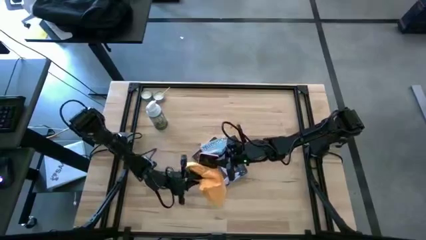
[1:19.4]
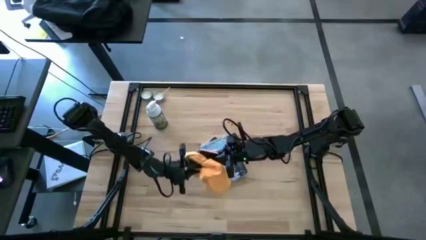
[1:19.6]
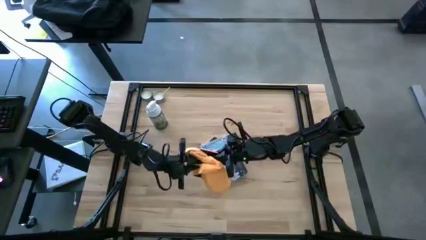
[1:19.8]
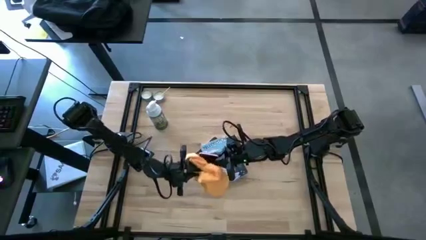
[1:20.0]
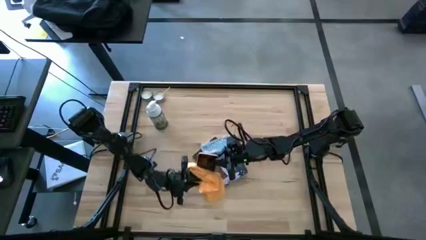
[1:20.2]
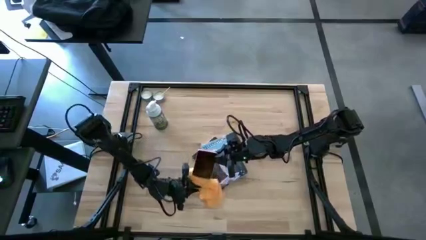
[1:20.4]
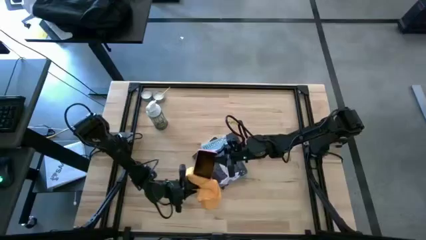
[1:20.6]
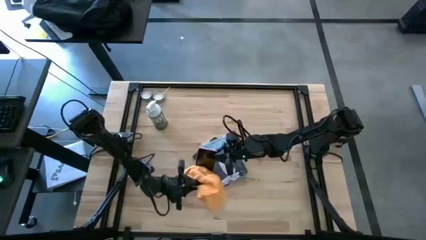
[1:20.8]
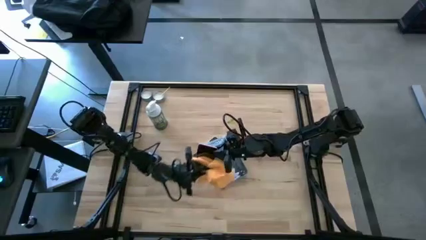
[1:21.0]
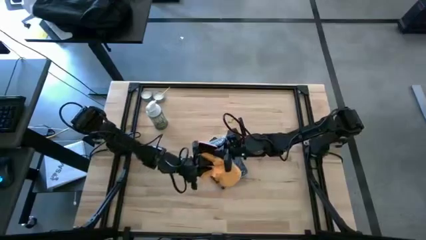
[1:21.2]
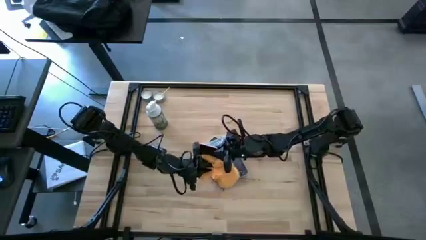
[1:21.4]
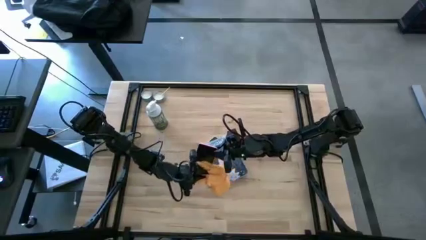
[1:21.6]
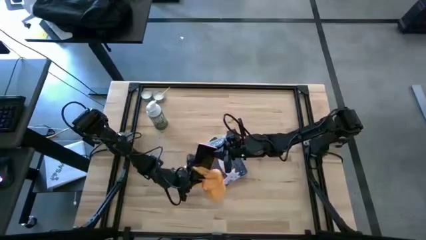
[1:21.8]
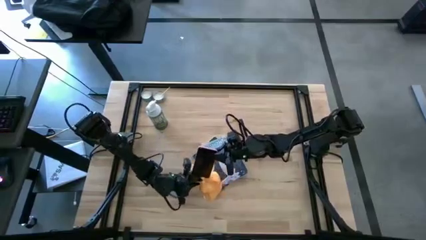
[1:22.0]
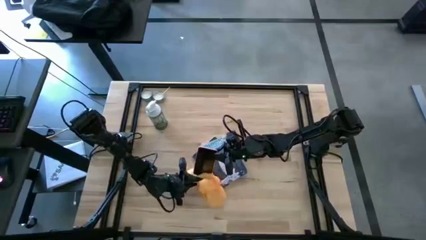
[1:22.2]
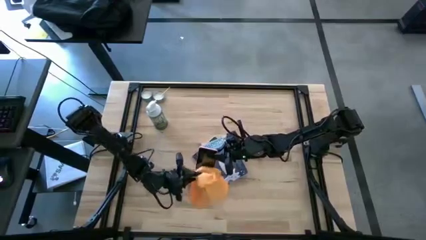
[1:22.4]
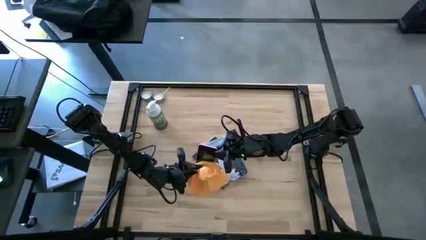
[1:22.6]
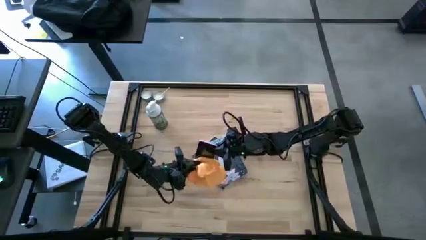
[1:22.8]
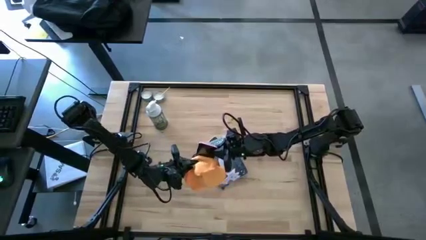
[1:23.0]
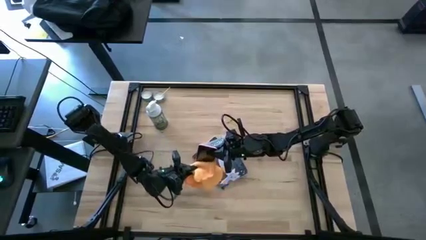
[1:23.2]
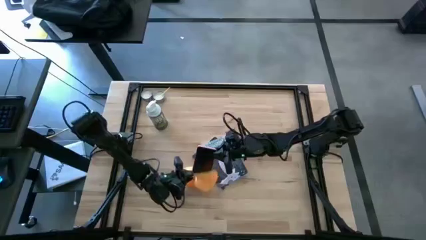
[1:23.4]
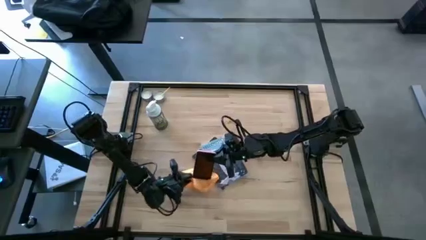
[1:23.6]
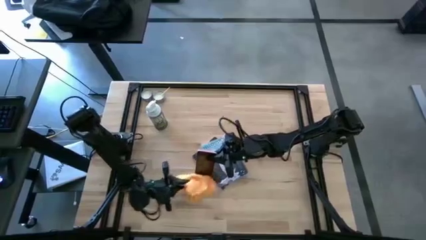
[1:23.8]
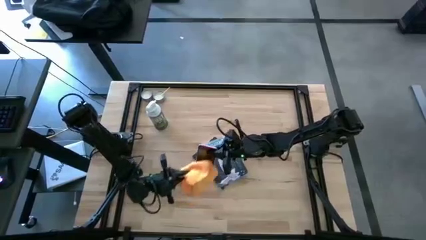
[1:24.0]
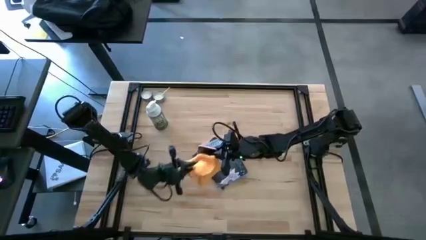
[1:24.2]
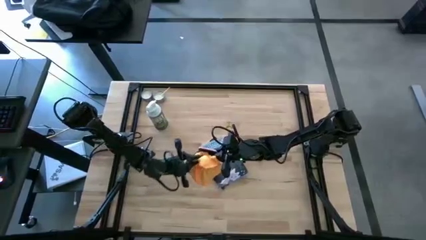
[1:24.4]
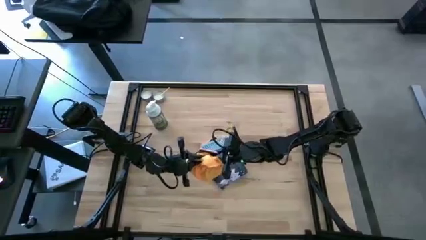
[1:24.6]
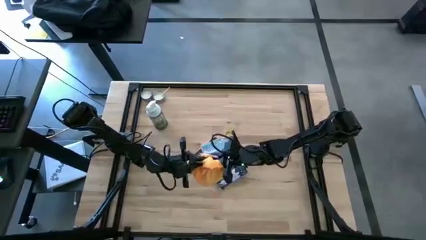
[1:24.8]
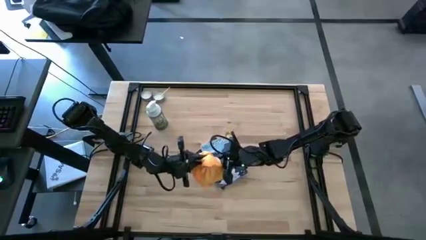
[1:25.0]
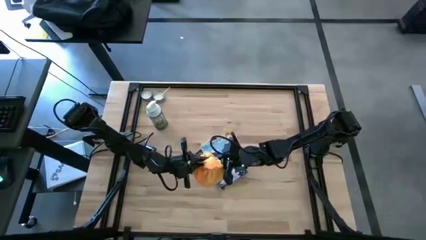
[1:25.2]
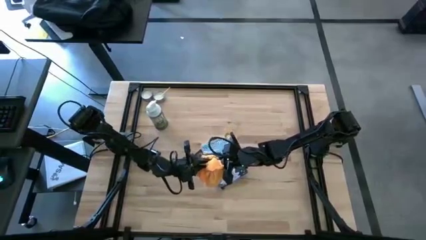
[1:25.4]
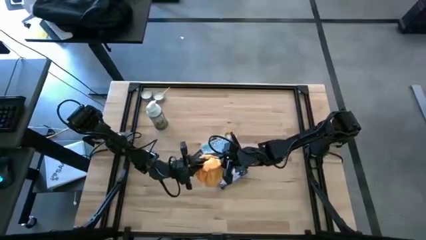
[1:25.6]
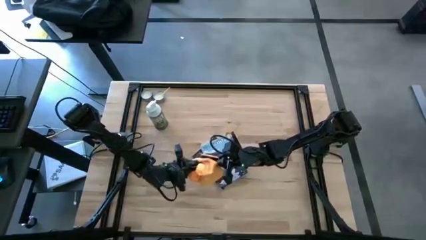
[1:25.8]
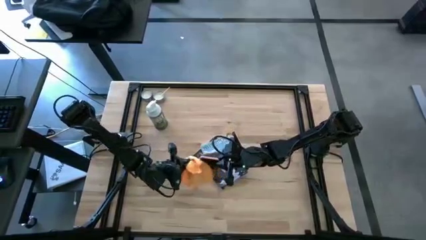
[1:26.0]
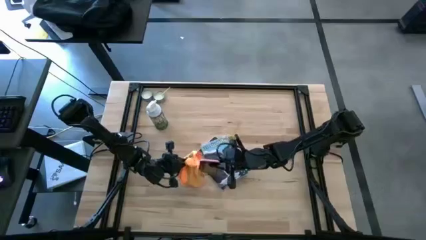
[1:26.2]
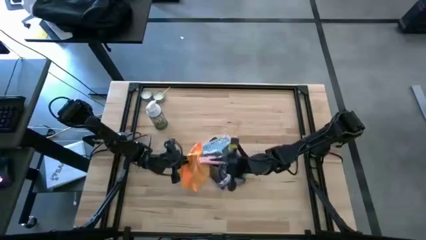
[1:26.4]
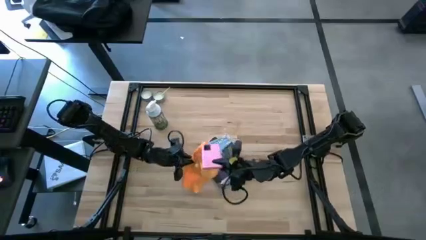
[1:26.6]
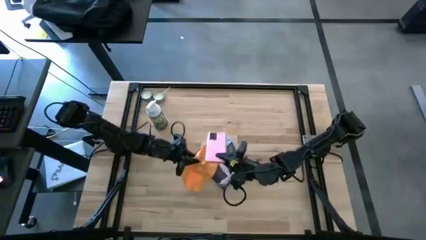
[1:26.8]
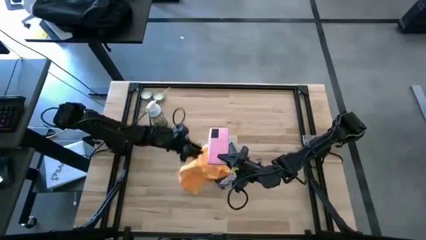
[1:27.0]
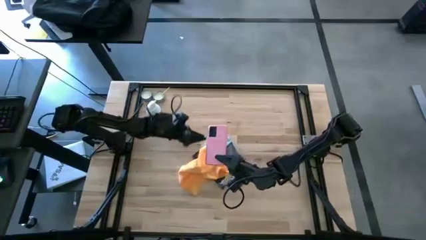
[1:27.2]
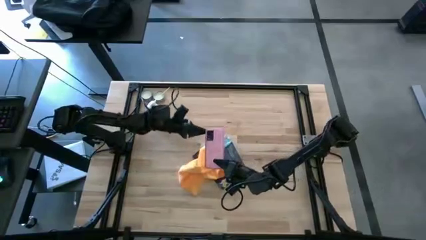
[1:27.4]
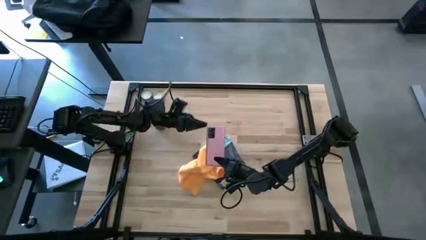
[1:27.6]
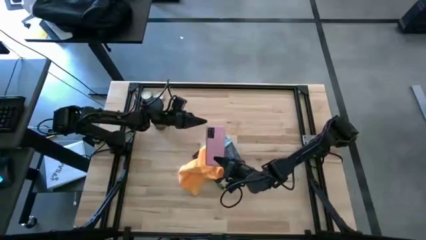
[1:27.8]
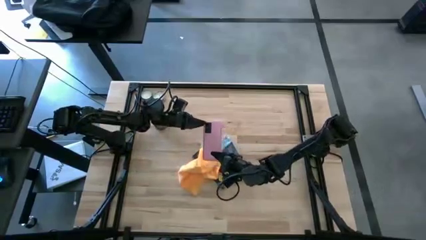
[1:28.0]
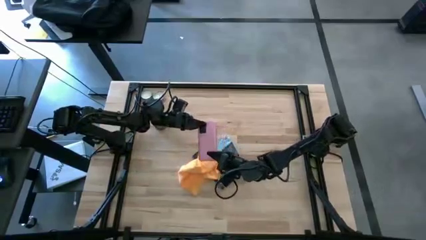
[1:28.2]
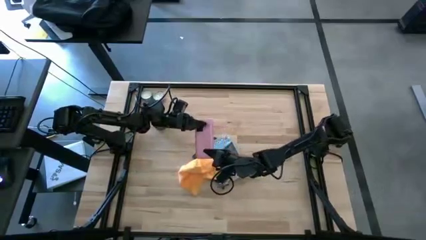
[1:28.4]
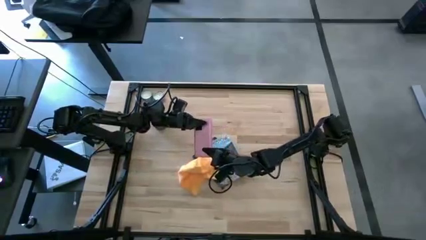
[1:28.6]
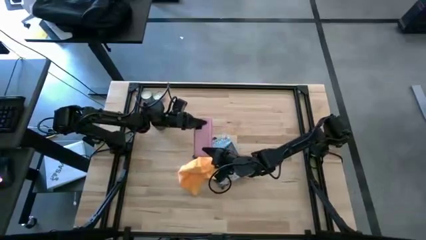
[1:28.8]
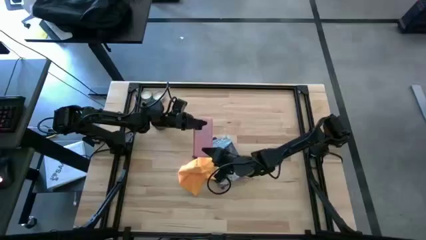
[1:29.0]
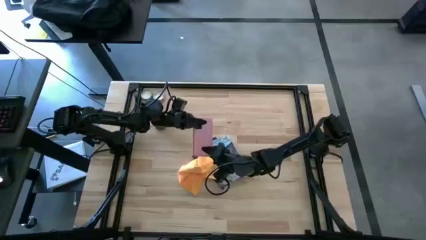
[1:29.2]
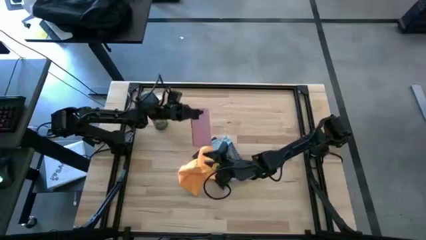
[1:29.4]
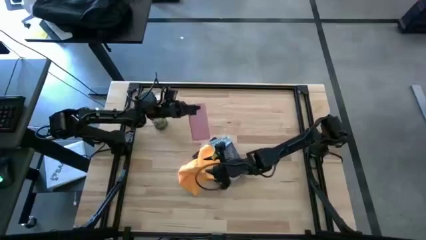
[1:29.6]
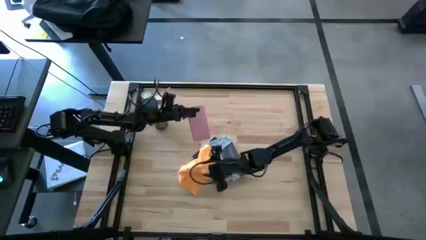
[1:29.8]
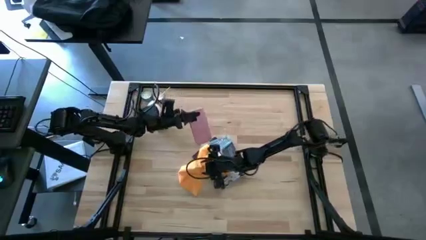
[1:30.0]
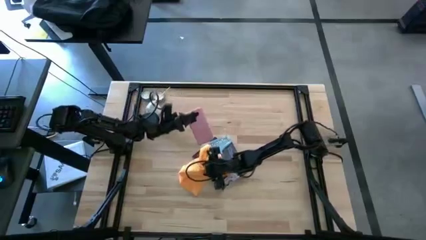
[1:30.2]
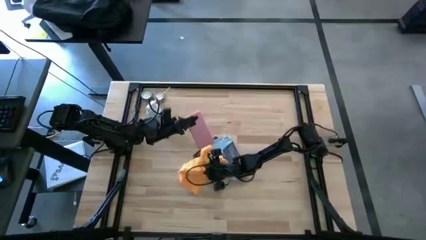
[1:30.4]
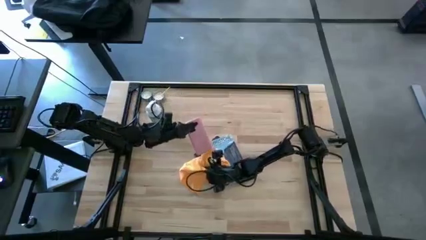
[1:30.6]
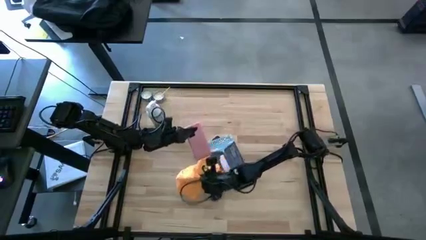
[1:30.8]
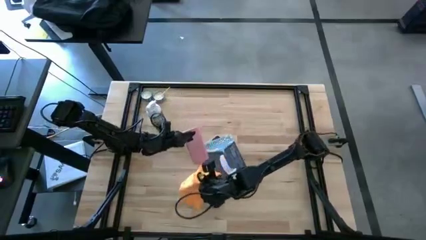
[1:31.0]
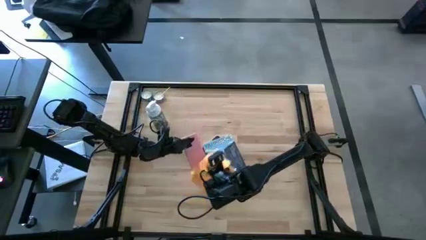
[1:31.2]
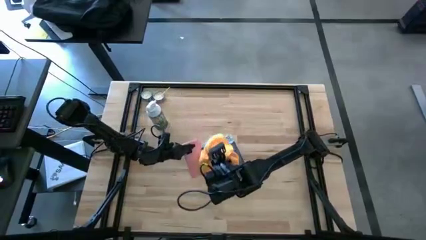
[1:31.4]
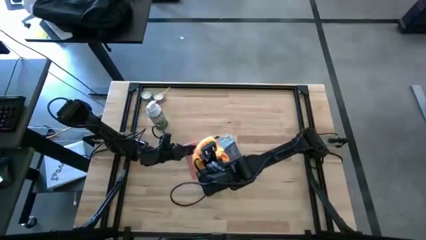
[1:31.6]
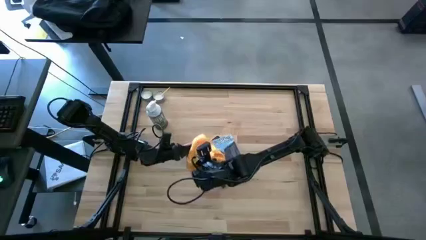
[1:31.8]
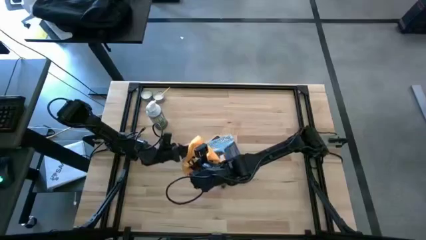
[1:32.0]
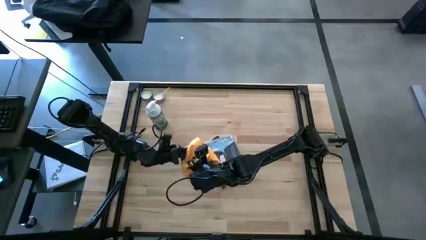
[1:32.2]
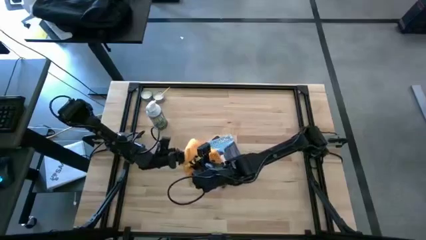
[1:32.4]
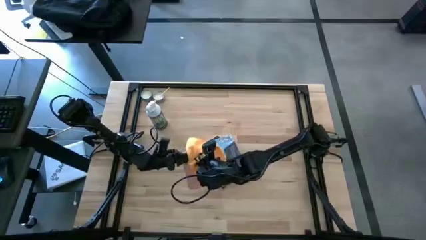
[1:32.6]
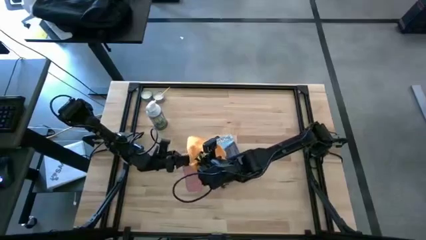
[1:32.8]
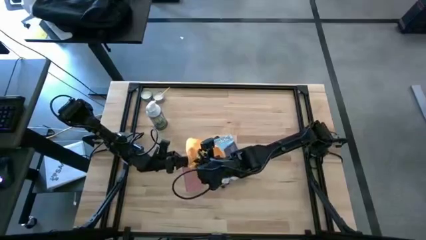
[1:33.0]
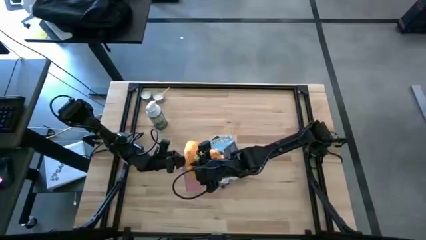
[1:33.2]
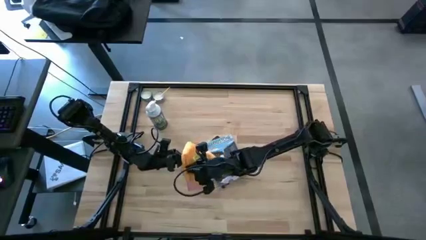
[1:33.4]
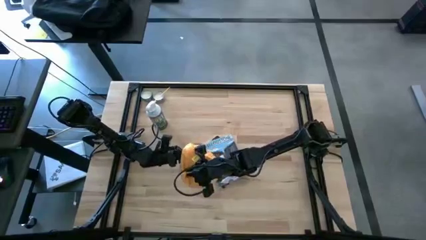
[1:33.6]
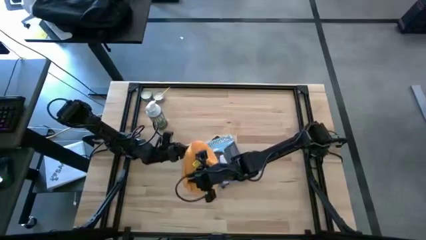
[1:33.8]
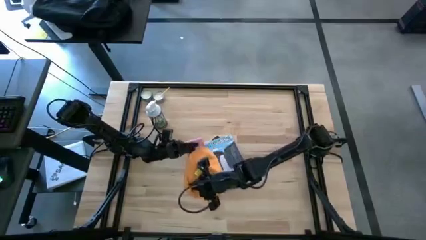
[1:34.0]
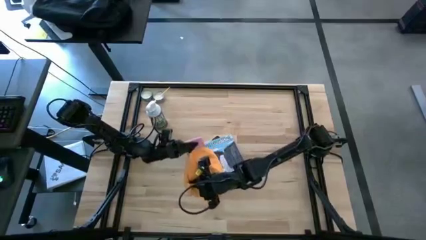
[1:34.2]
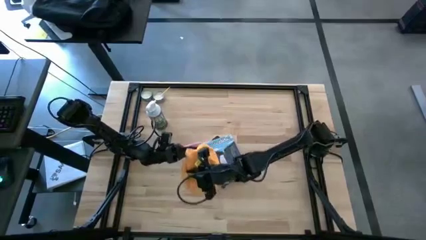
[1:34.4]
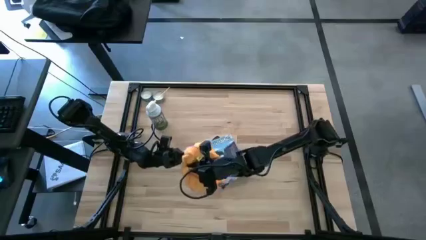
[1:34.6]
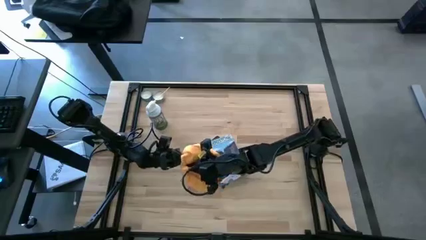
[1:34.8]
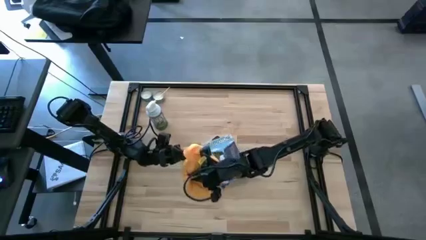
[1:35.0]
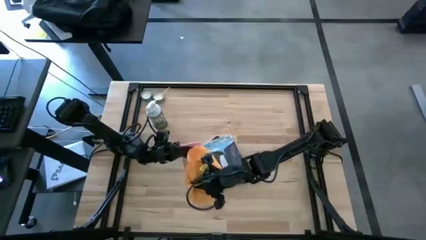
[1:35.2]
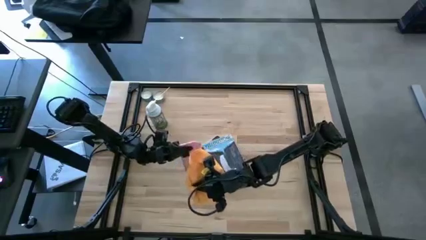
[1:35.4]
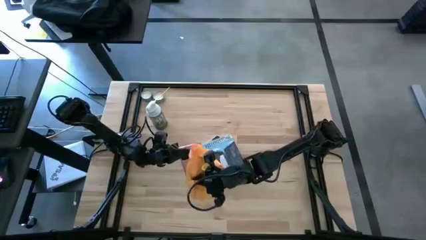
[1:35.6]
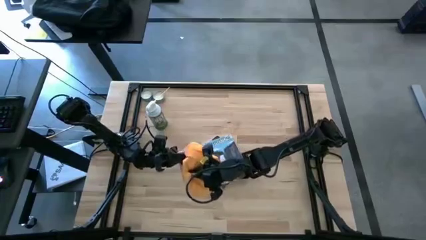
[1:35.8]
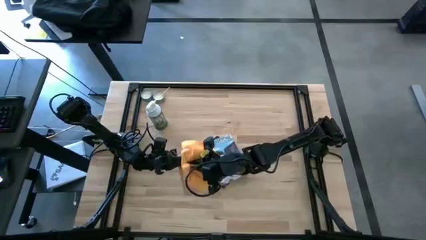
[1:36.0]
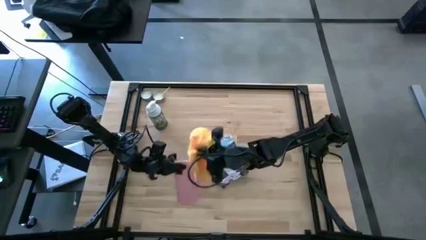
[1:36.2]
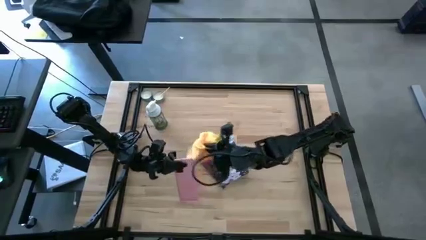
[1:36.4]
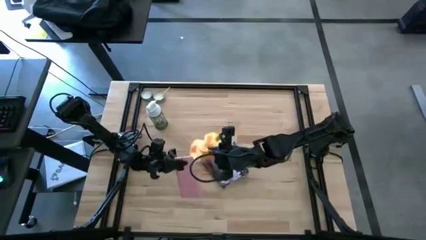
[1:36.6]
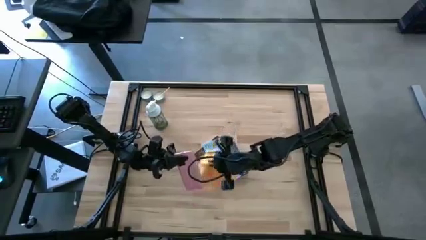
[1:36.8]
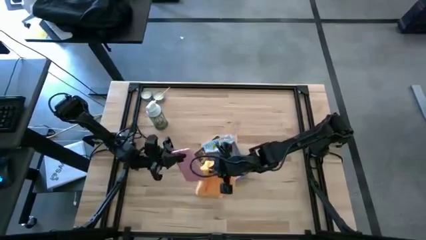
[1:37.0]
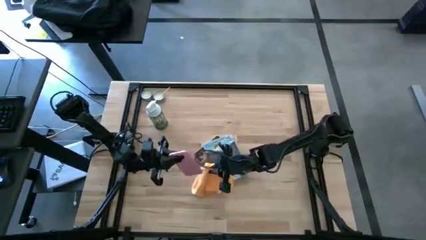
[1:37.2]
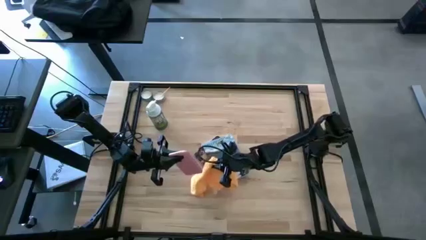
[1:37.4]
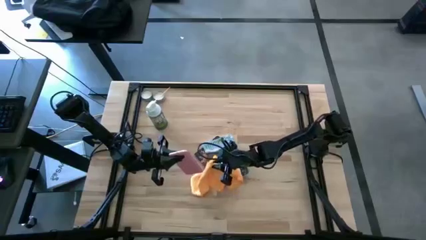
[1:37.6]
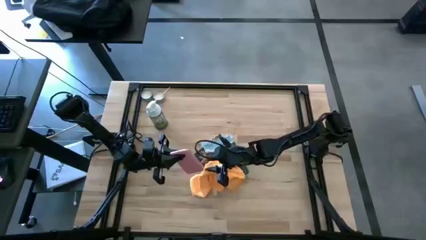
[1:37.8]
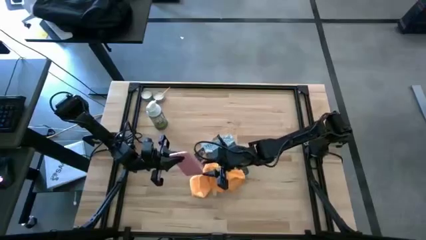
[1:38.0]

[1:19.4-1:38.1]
Task: Apply microfiber cloth
Wipe the front and back of the cellphone using the orange microfiber cloth
